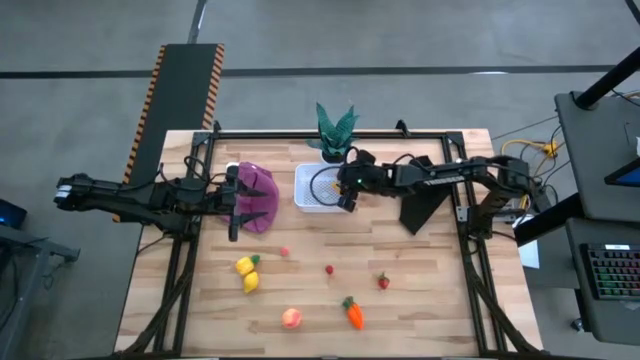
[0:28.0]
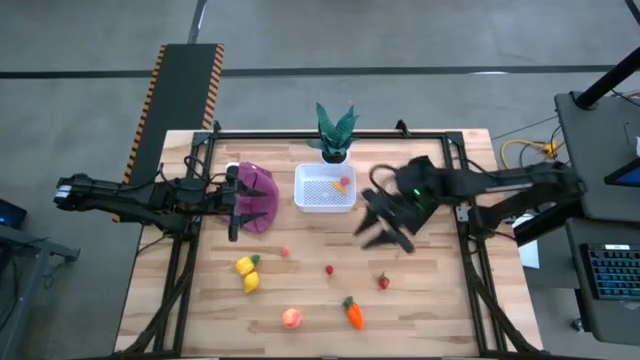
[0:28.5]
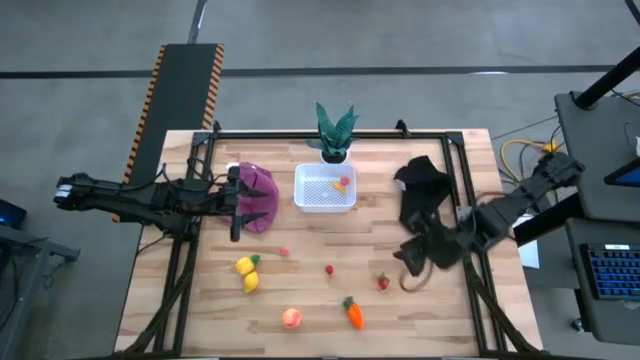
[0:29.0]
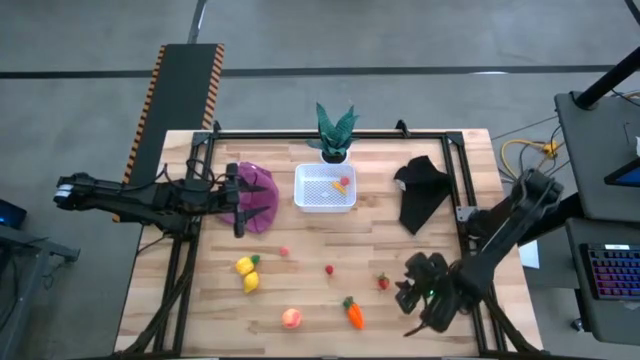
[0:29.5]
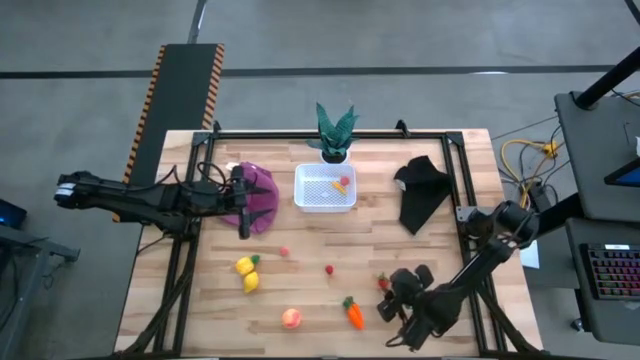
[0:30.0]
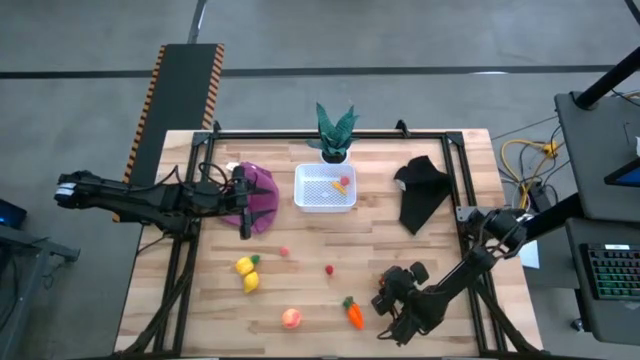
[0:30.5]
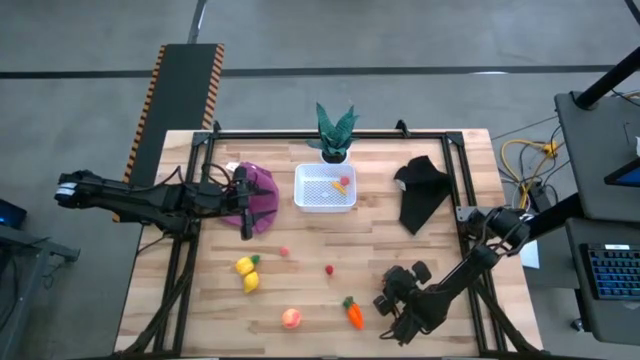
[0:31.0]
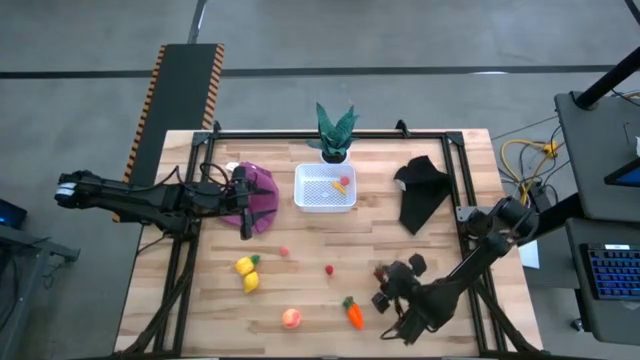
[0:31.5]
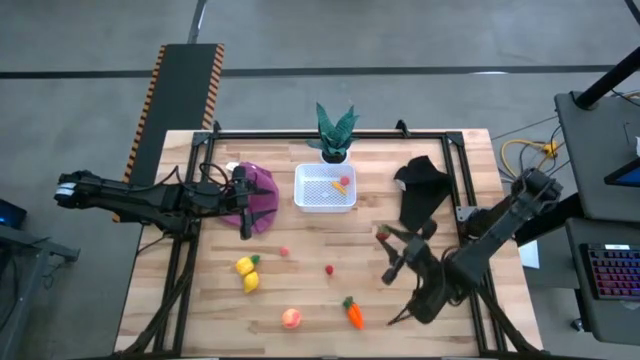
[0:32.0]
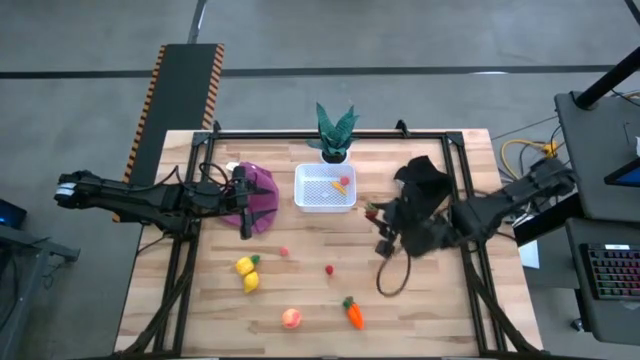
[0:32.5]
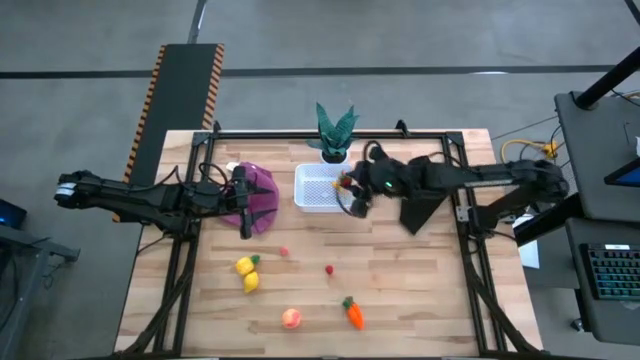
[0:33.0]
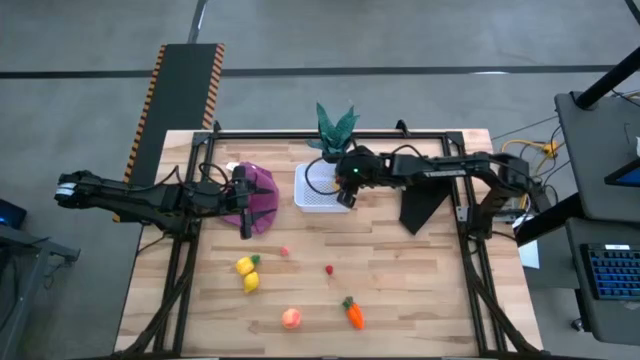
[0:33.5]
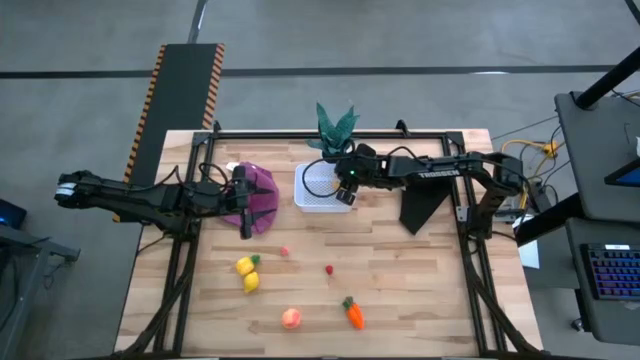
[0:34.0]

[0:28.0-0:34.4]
Task: Build produce basket
Put the strawberry into the white basket

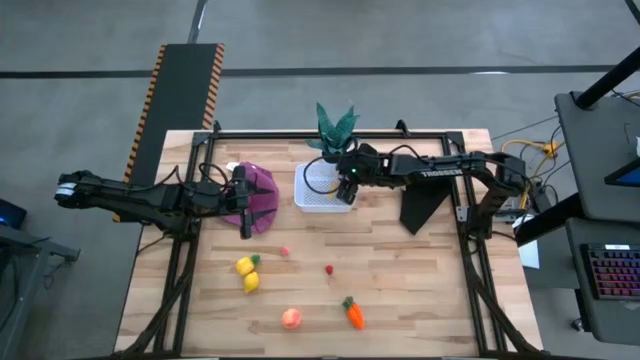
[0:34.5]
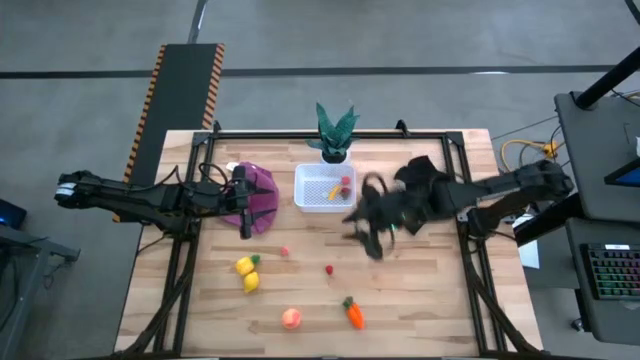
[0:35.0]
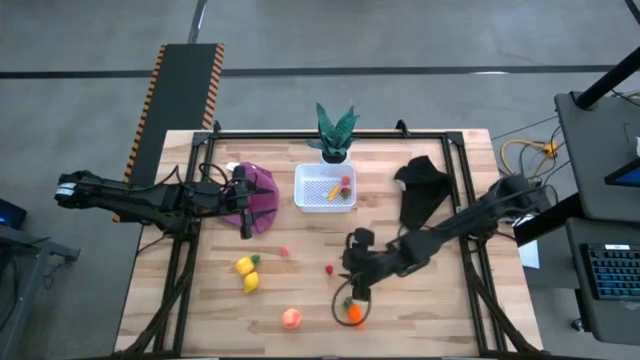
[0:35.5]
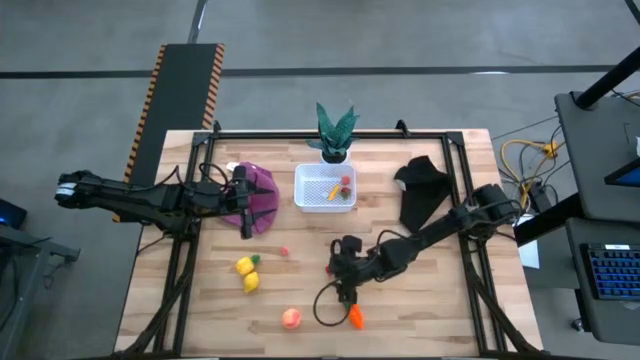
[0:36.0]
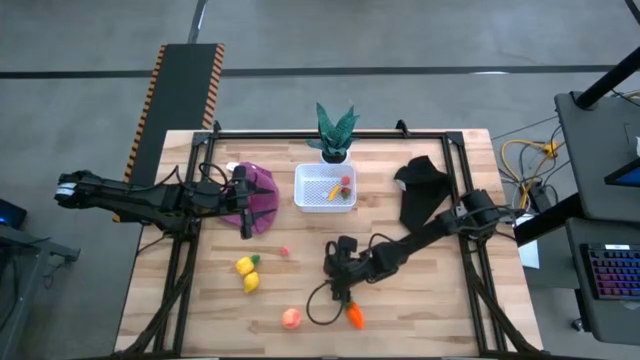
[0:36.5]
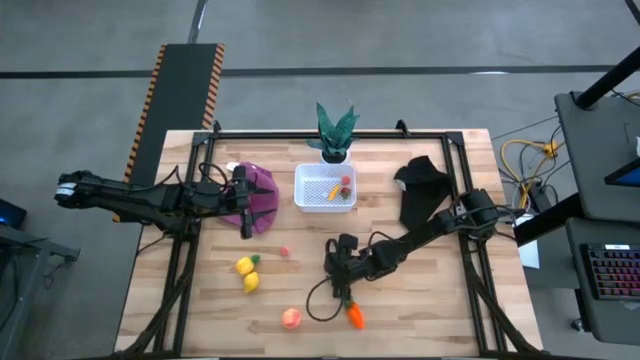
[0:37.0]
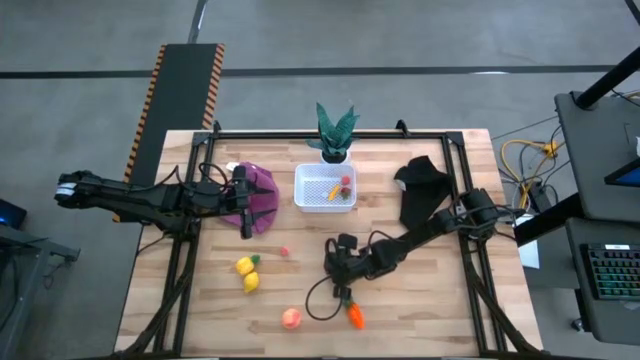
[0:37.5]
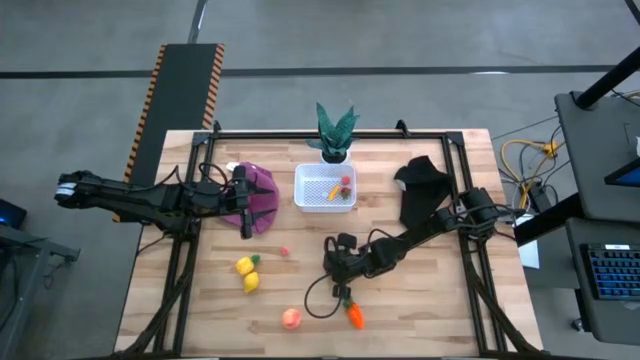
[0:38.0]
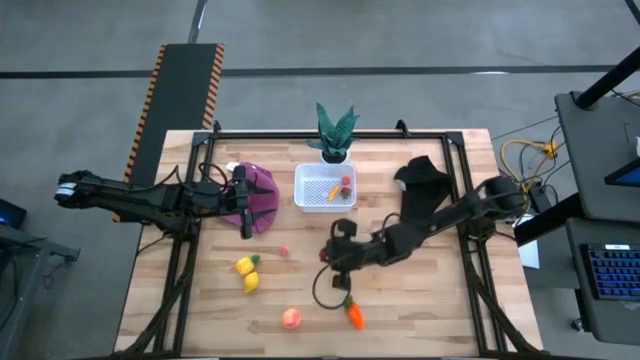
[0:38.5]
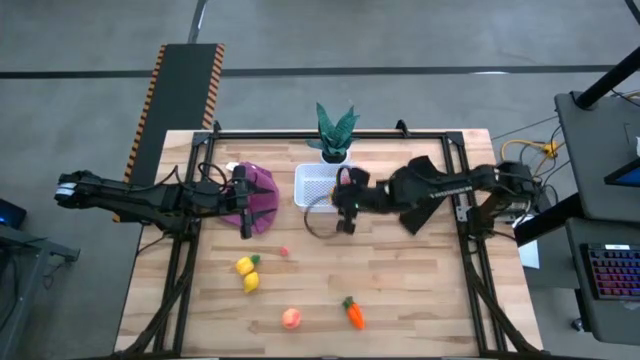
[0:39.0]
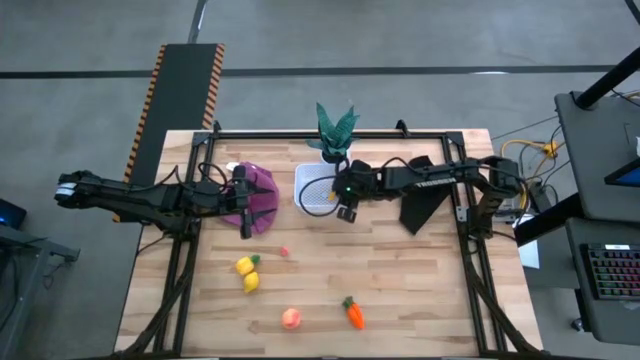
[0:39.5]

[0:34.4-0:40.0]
Put the raspberry into the white basket

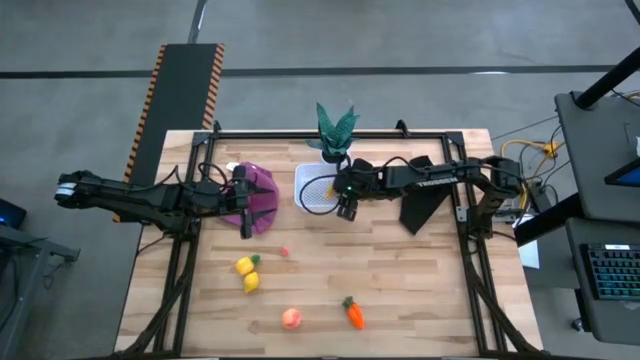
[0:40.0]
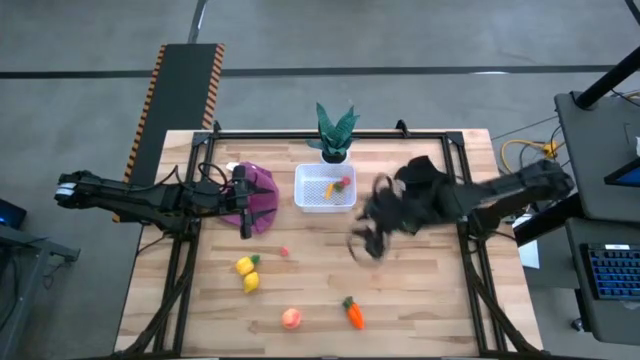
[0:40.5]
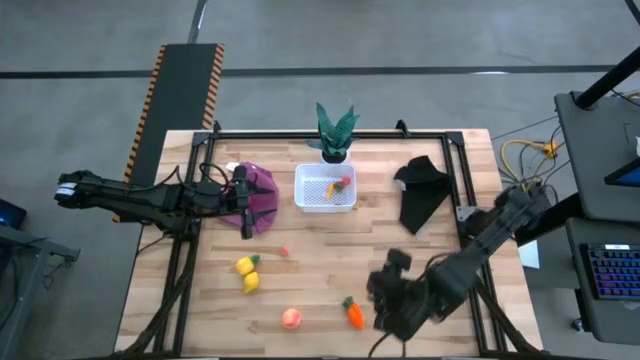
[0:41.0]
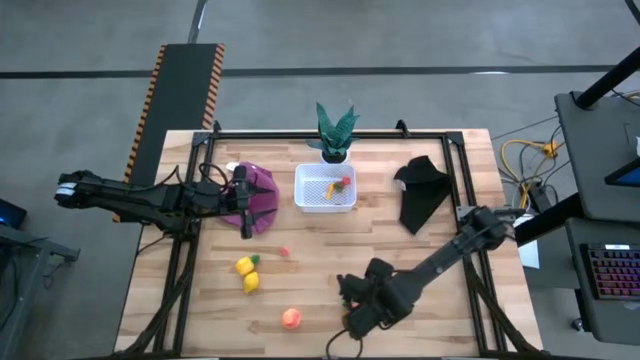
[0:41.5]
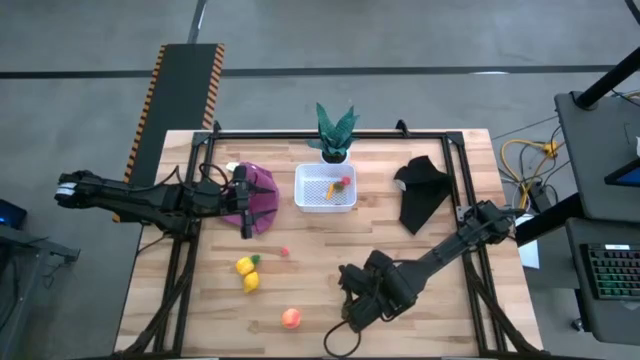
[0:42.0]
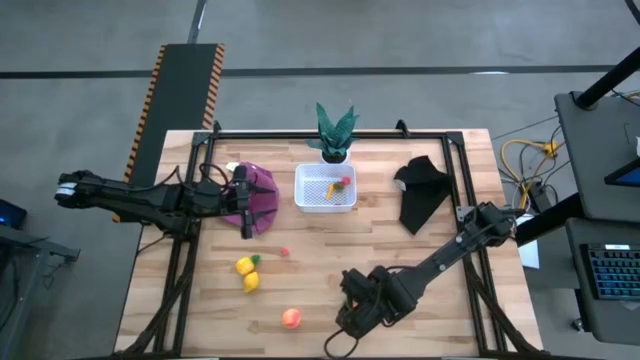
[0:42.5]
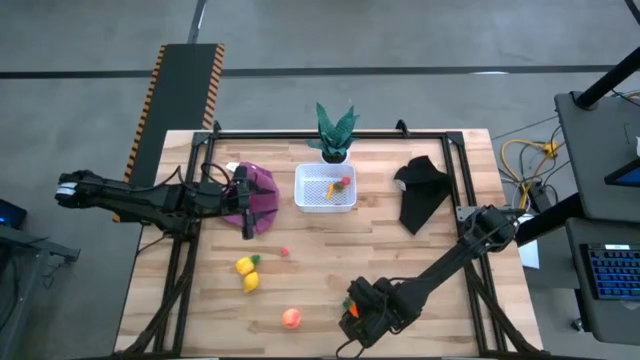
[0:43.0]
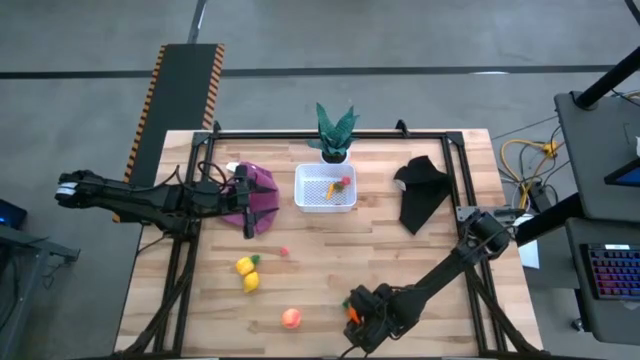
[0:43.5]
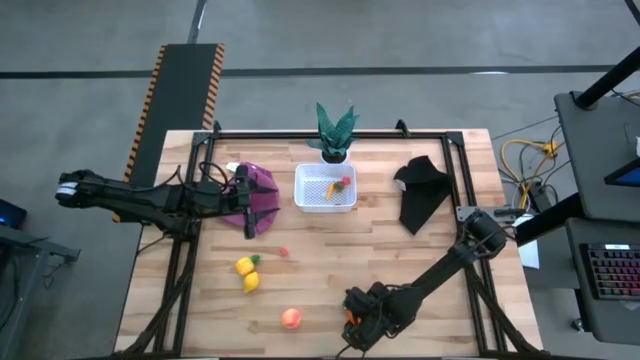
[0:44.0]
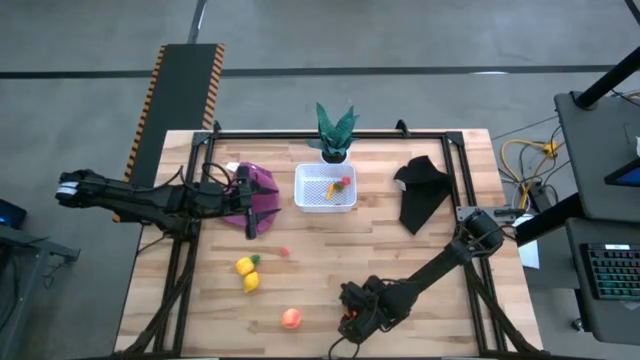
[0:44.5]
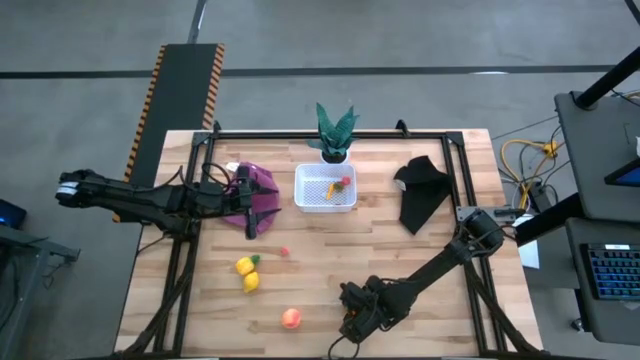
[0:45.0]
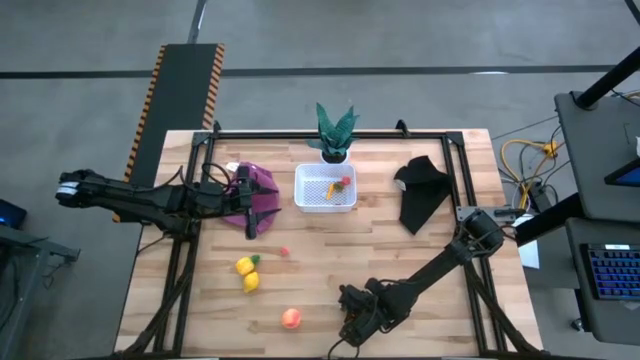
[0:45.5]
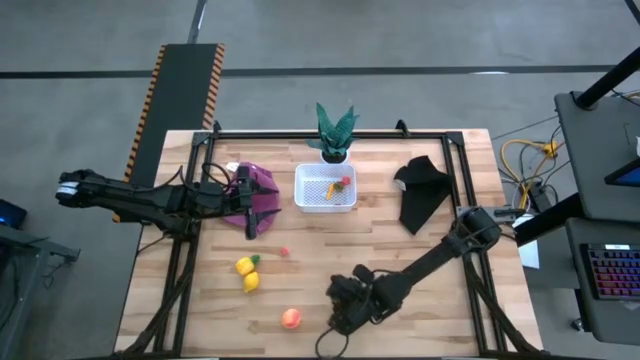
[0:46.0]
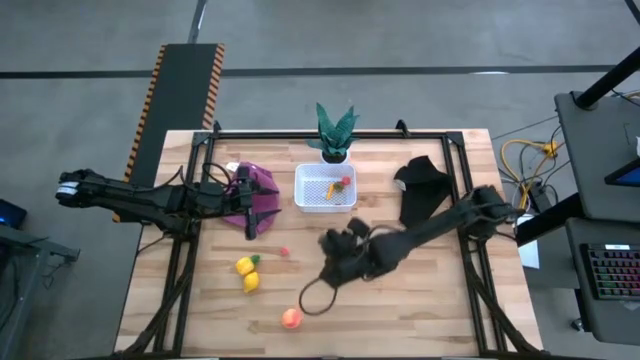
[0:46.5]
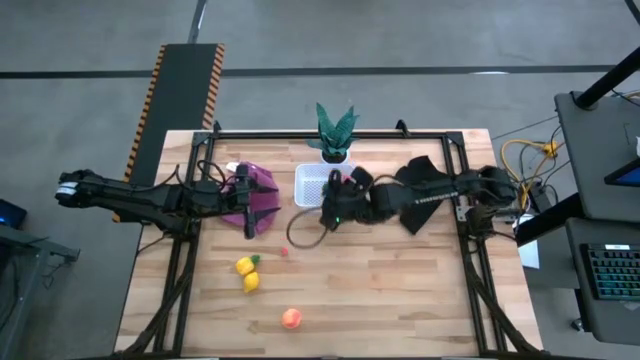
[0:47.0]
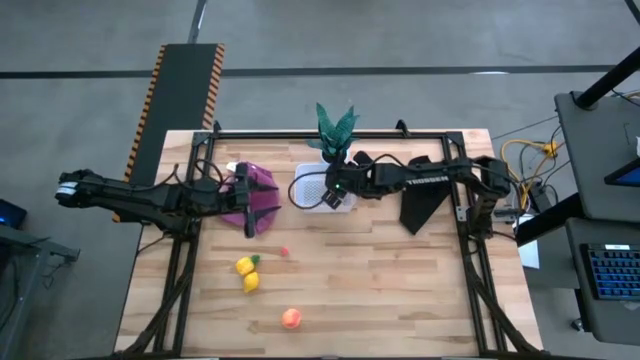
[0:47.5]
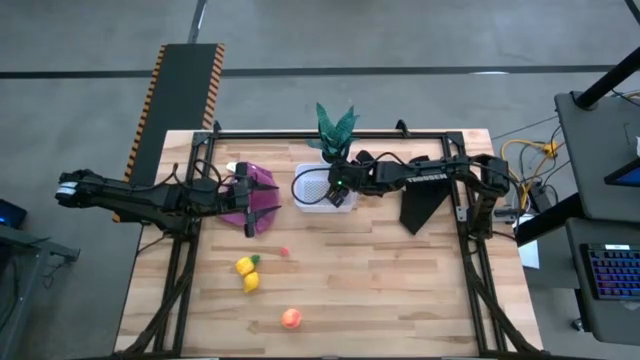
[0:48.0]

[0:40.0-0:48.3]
Put the carrot into the white basket

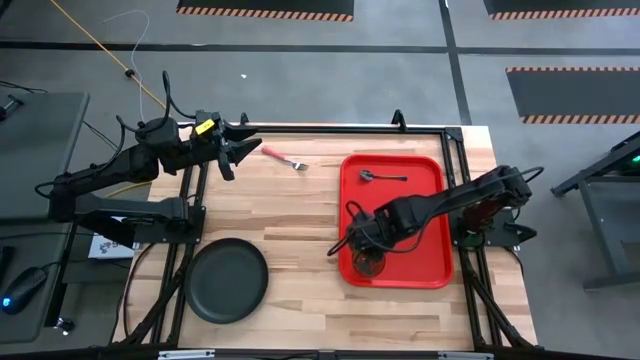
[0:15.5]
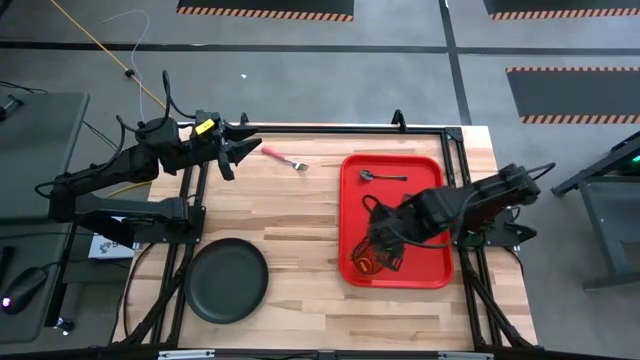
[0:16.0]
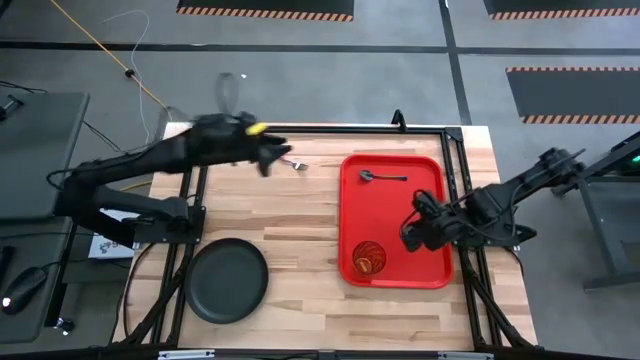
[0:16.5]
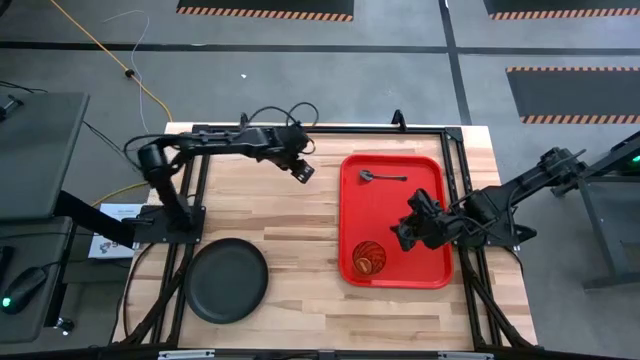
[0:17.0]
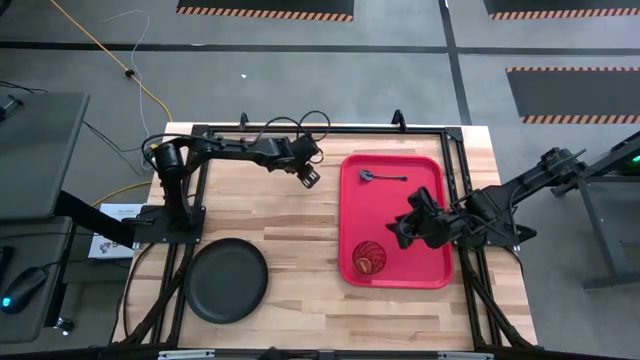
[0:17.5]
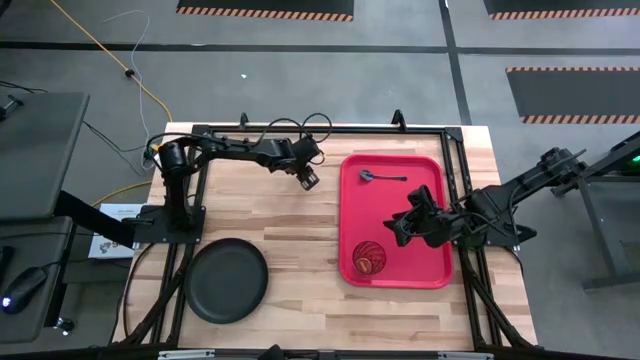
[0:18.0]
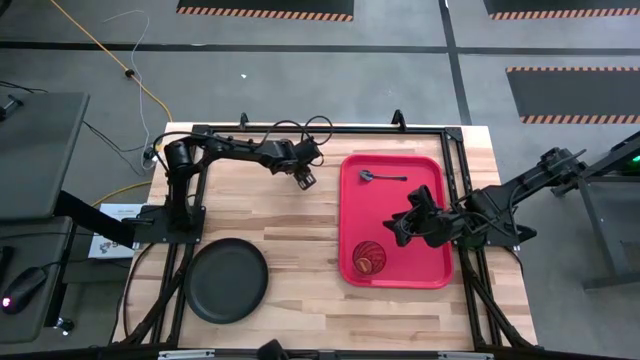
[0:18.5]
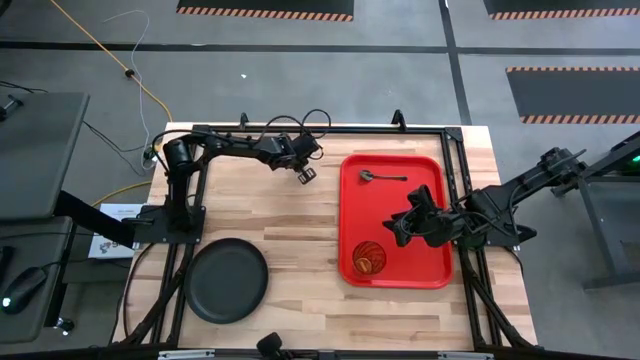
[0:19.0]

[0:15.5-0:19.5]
Task: Pick and place plate/cup/fork/spoon on tray
Put the red fork on the red serving tray to the bottom of the black spoon
